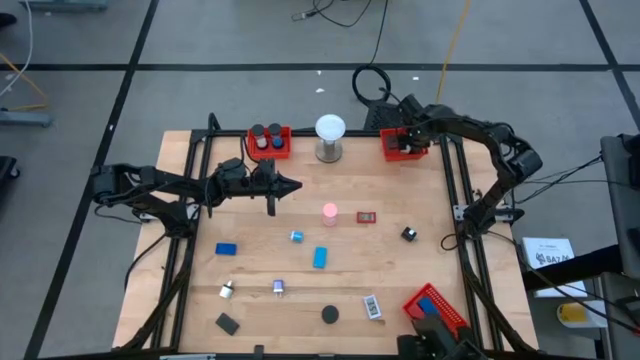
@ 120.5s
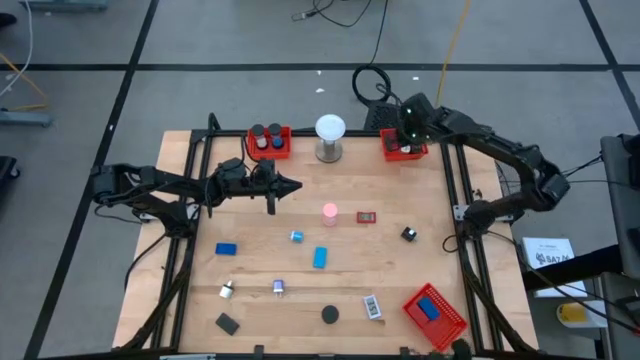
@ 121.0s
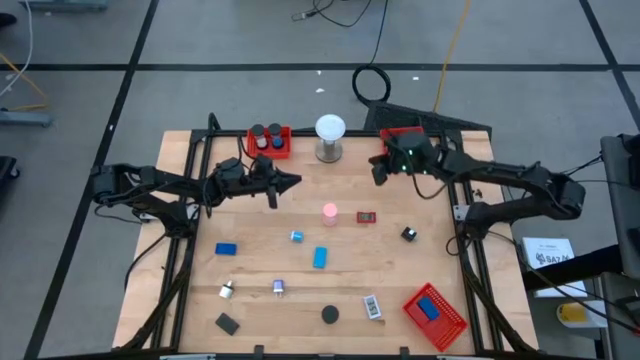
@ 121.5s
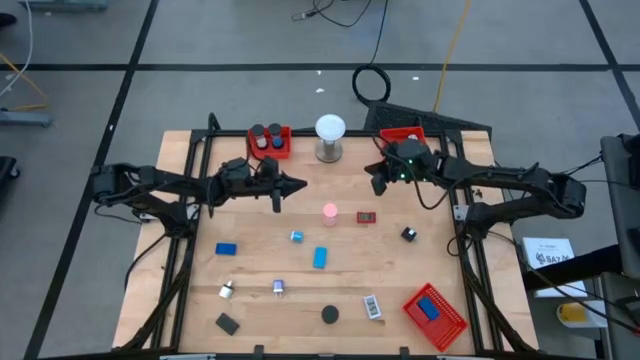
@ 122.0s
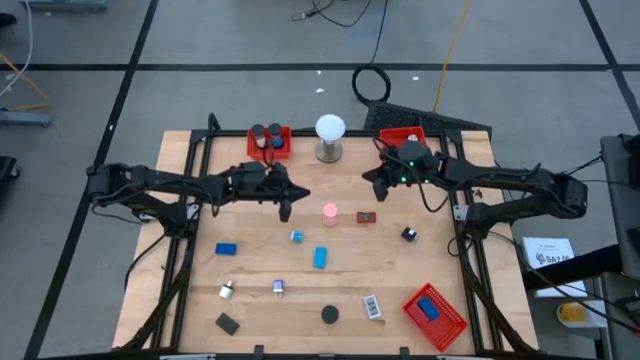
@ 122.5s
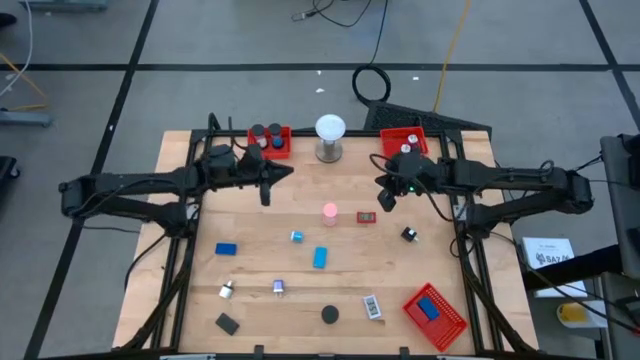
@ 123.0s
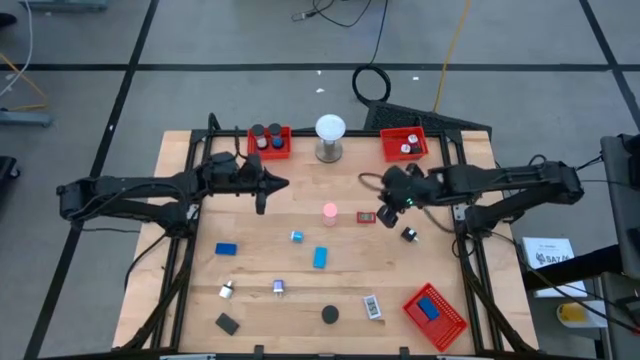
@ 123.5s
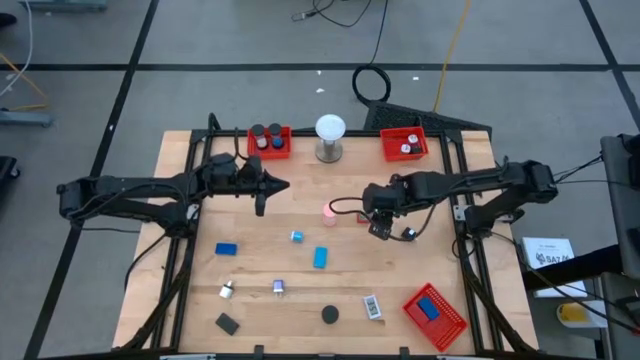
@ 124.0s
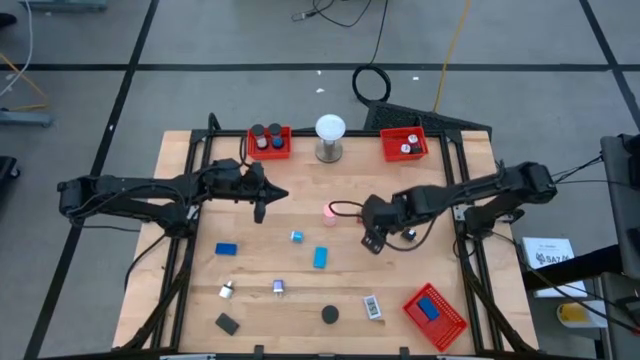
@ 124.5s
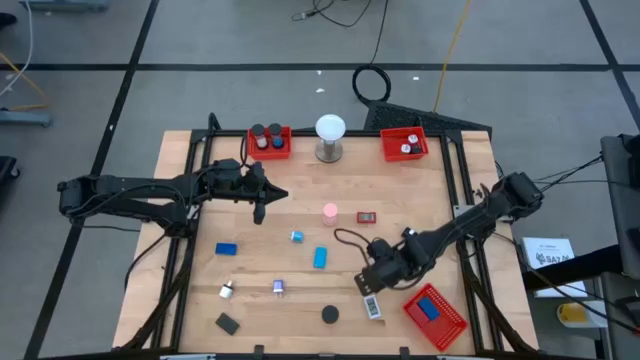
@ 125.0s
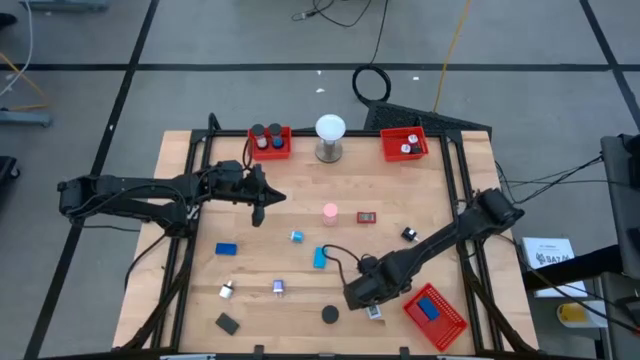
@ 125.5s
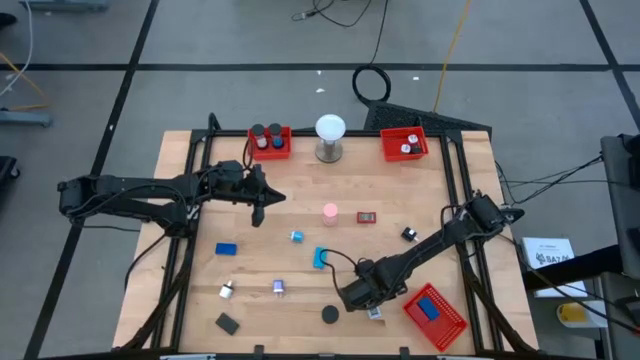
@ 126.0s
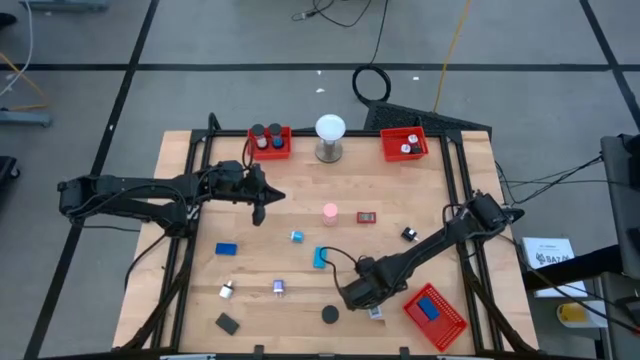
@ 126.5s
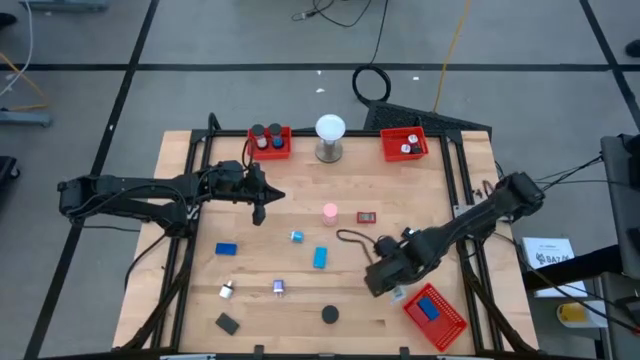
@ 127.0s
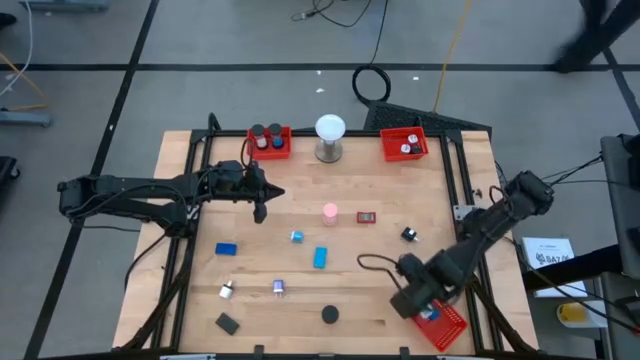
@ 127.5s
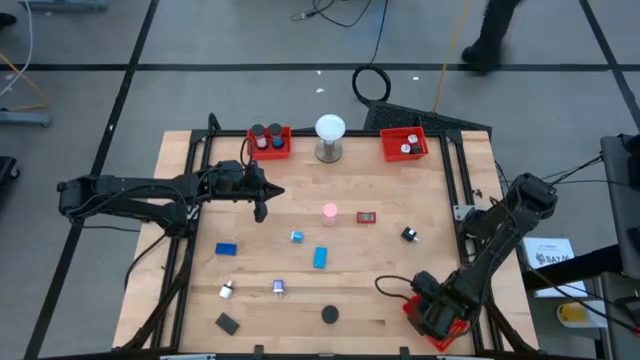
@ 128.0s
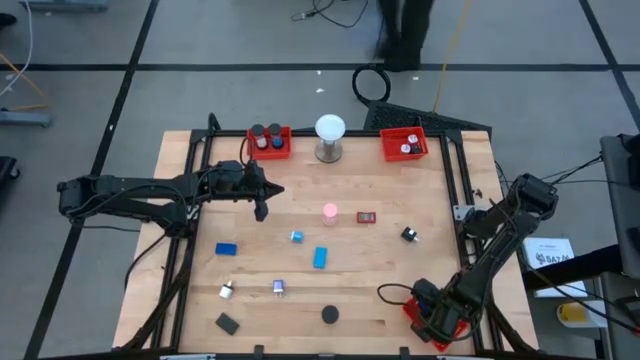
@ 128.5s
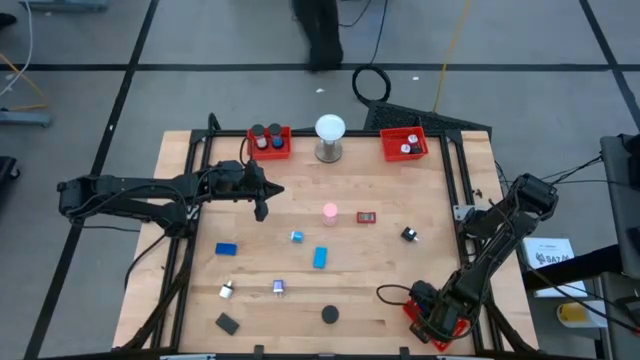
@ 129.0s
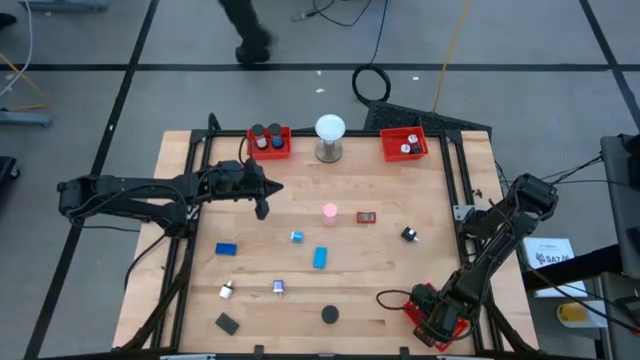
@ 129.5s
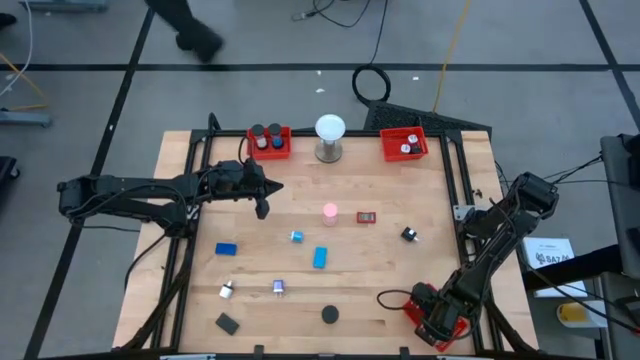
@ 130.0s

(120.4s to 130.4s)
Task: Pick & Place Office items
Put the white digital clock into the bottom right red bin
